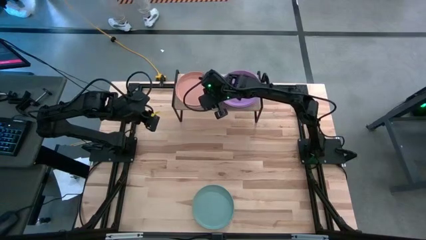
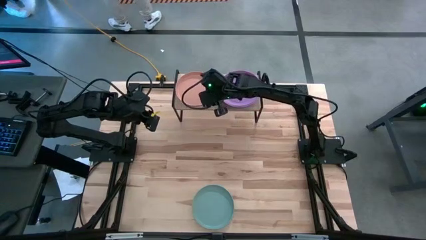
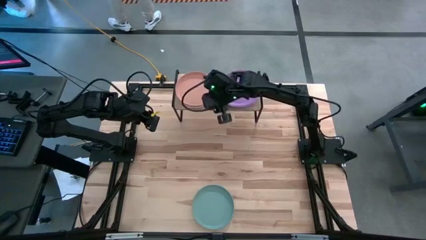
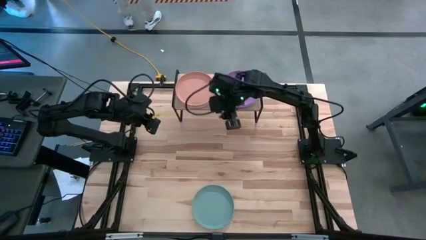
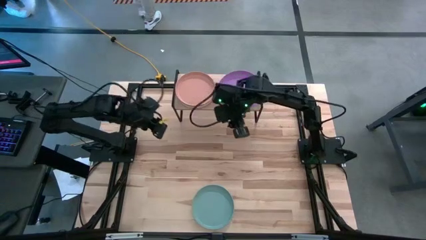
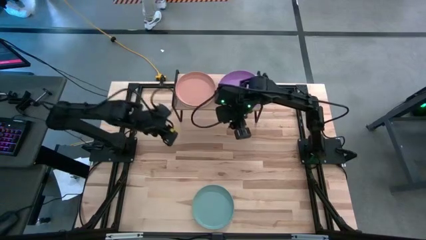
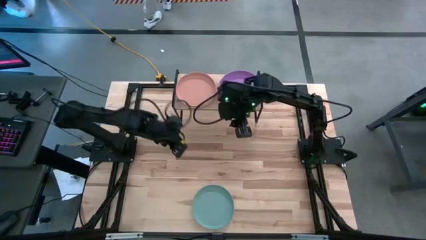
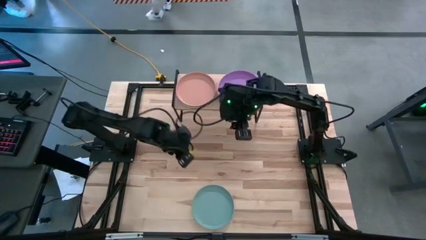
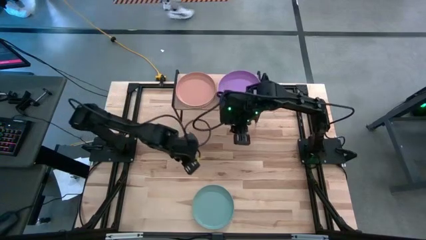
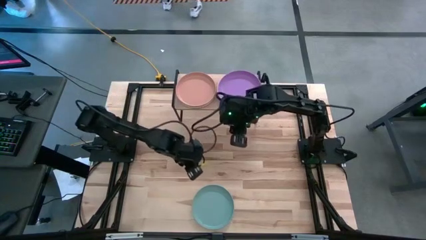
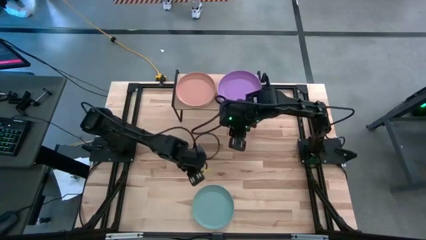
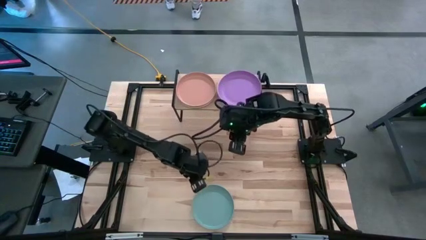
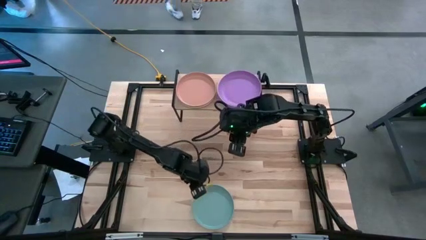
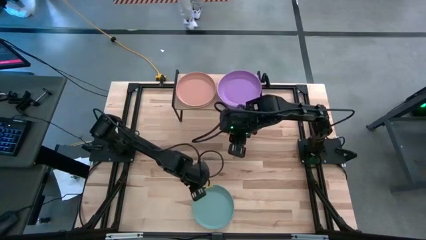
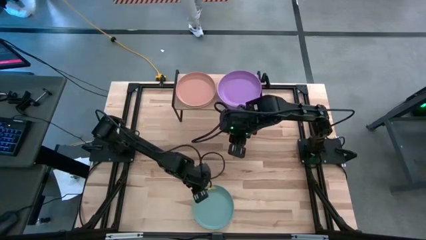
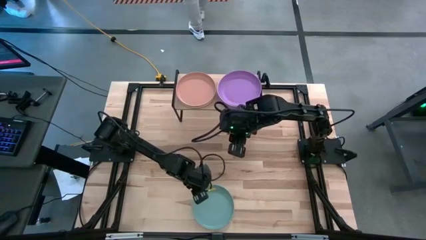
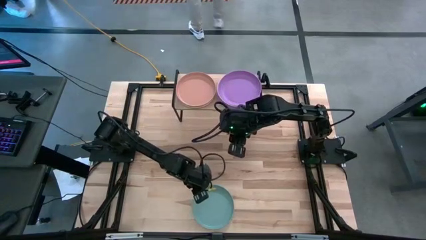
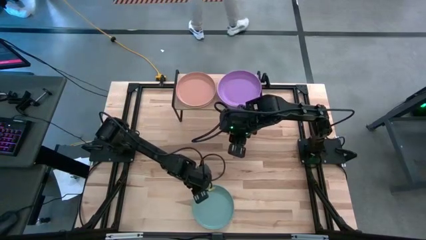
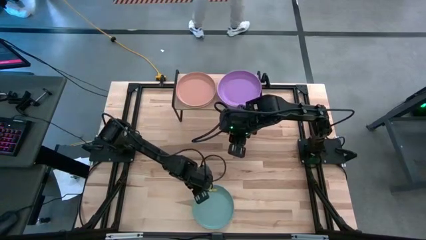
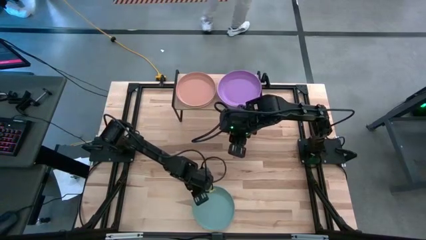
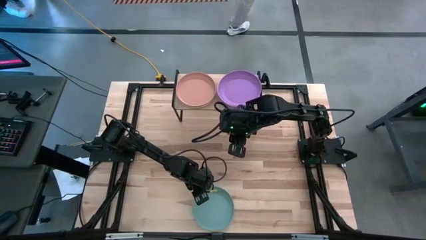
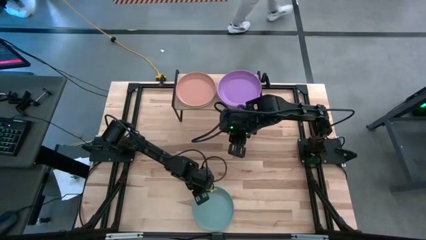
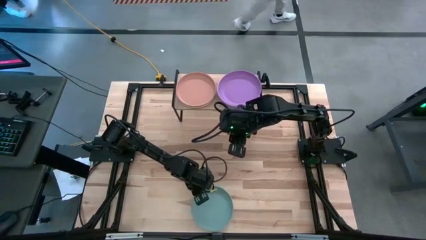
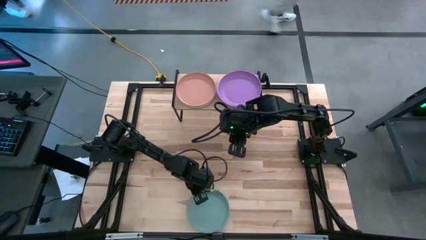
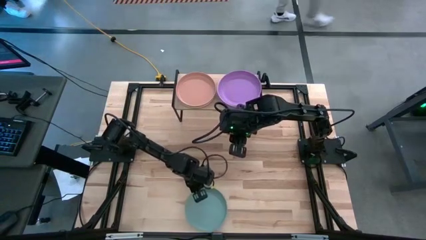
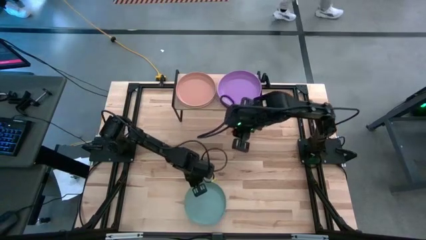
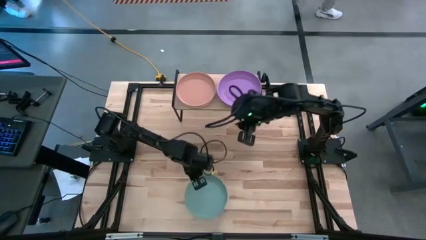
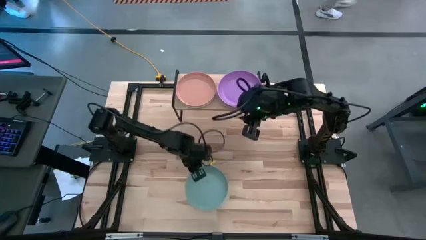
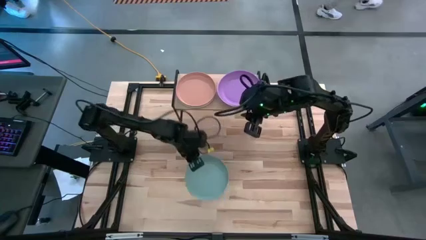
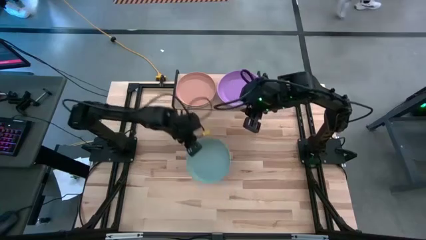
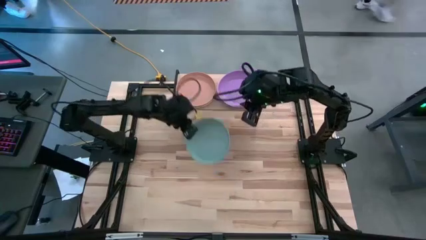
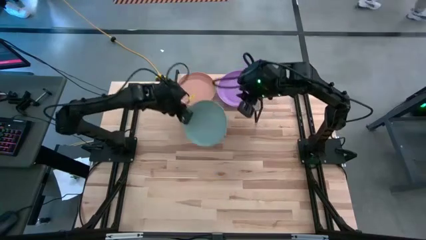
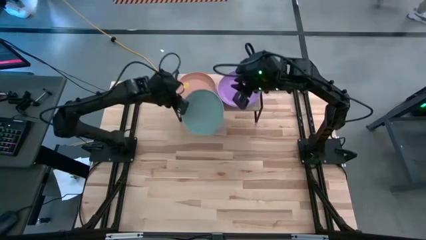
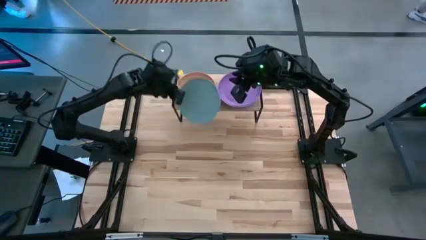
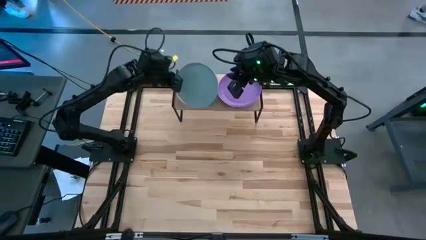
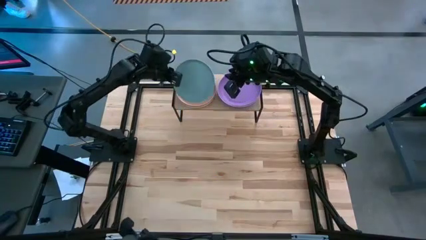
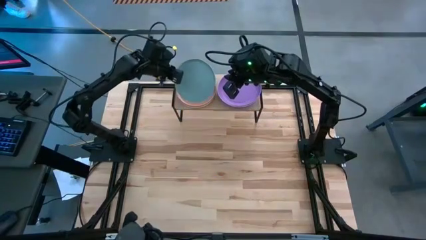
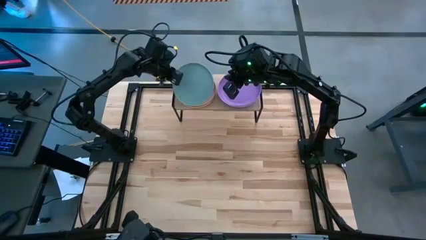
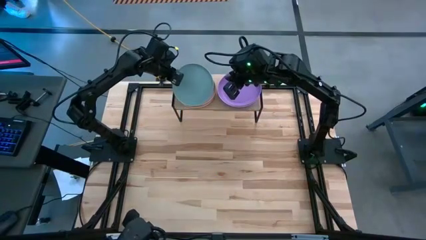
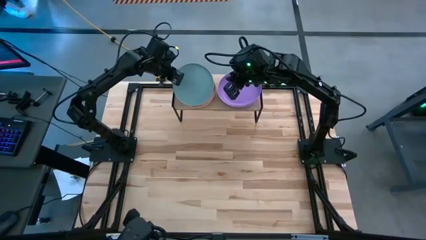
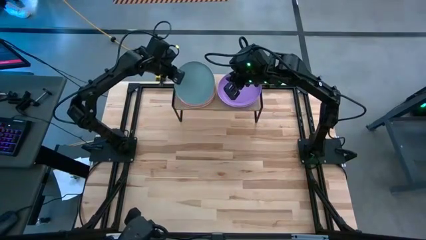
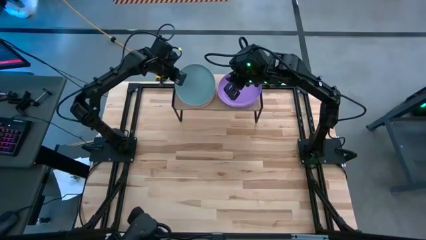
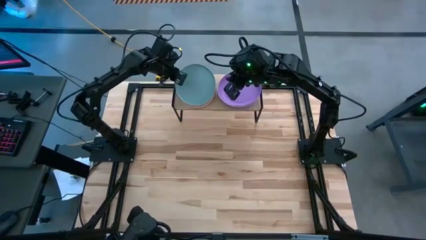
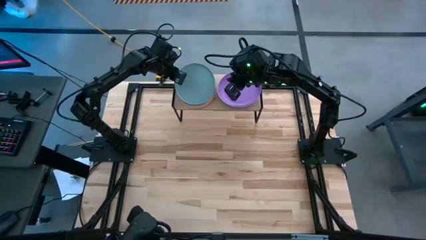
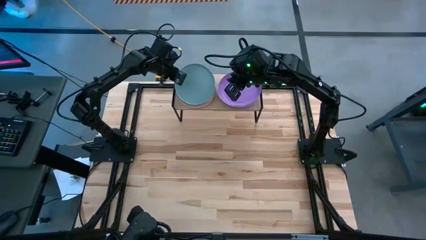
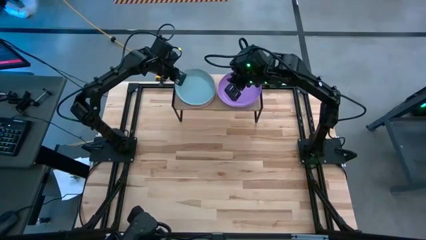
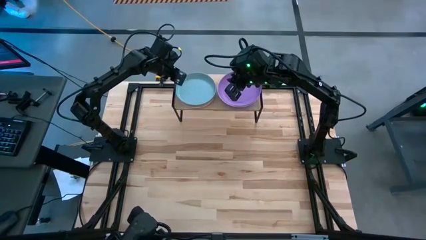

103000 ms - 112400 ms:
Task: Place and stack plates onto a shelf
Stack the green plate on the orange plate on the shelf

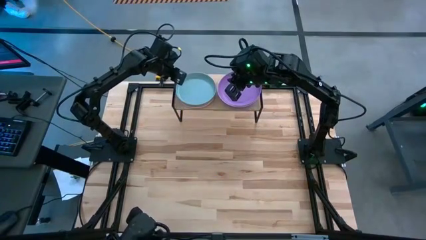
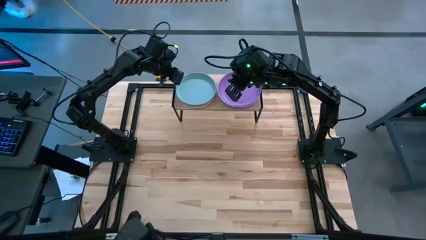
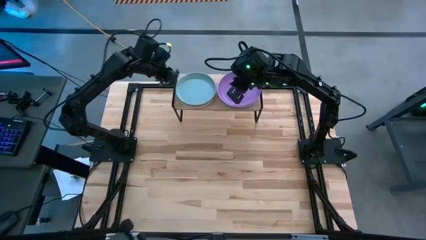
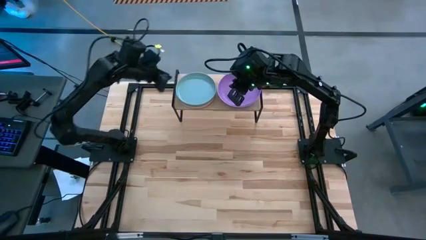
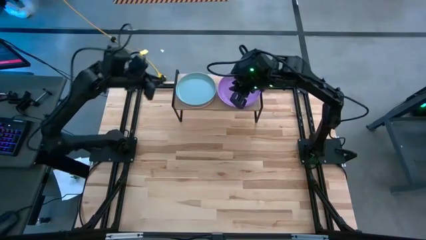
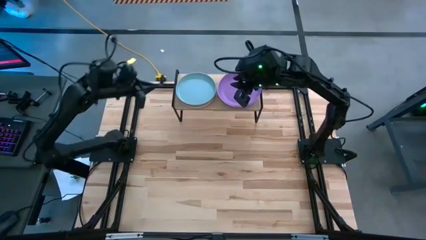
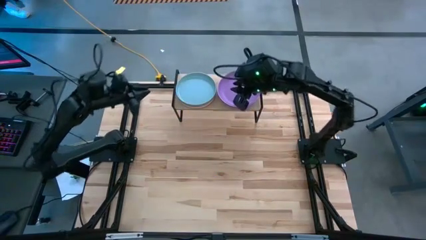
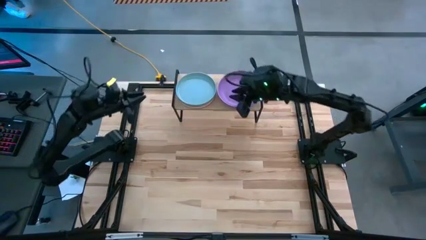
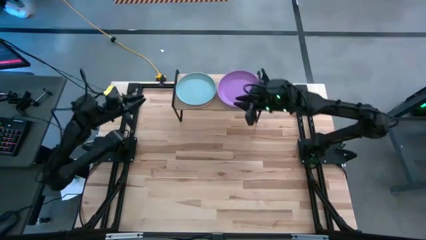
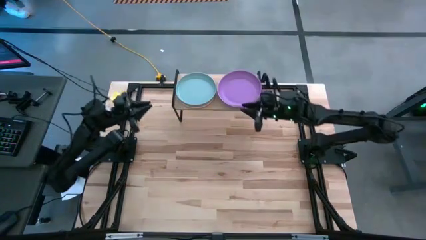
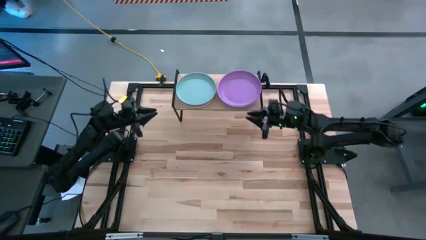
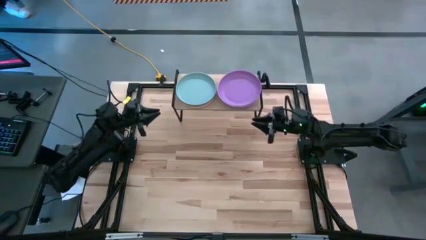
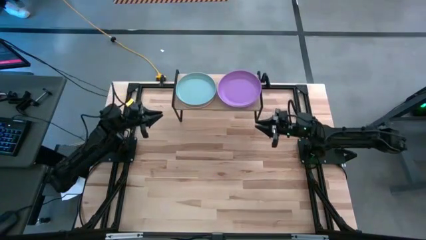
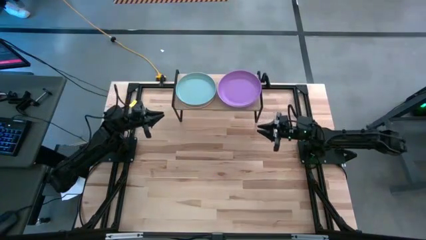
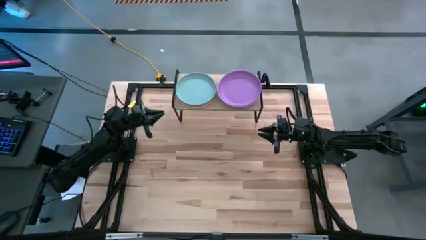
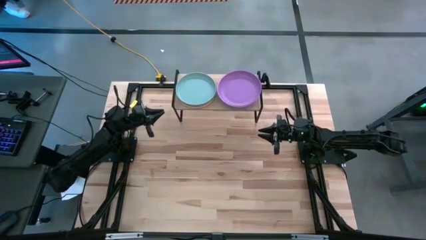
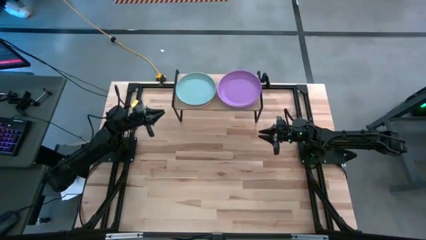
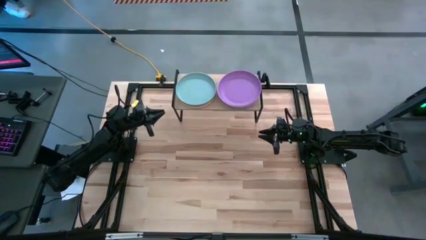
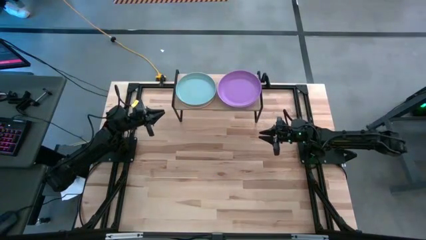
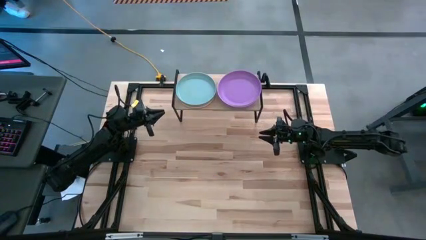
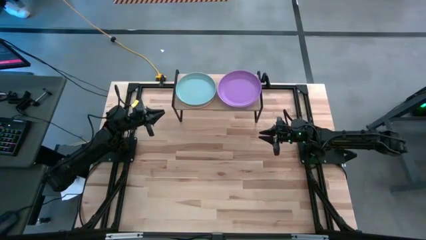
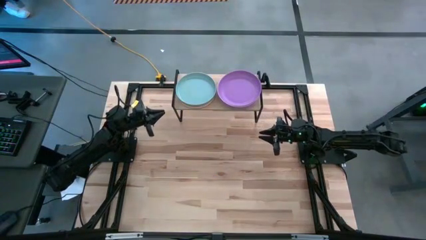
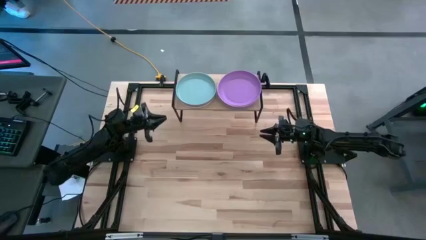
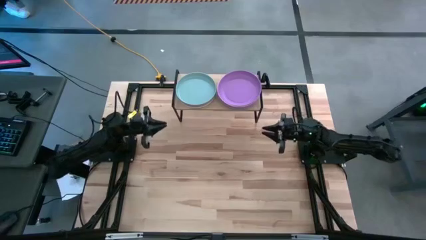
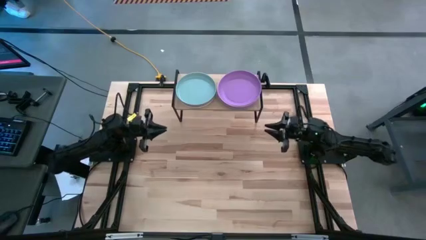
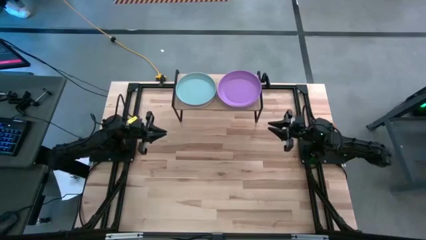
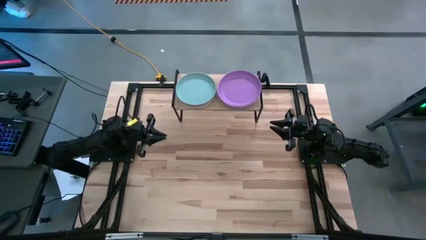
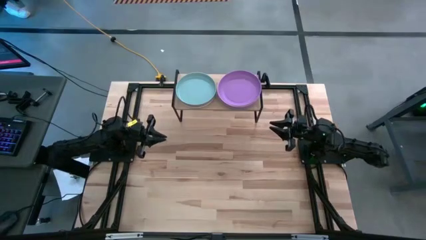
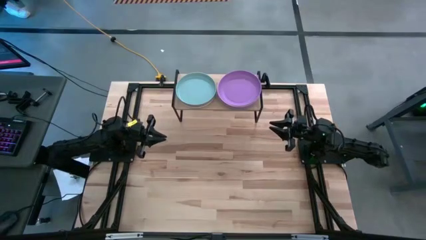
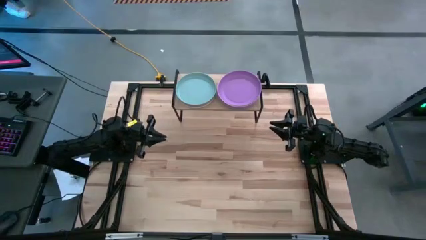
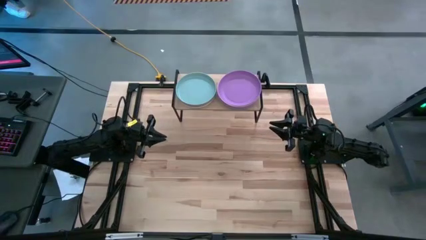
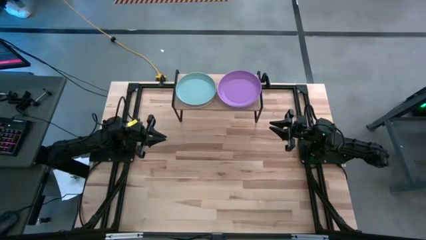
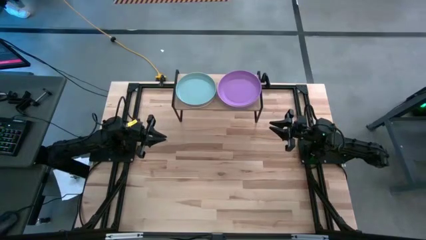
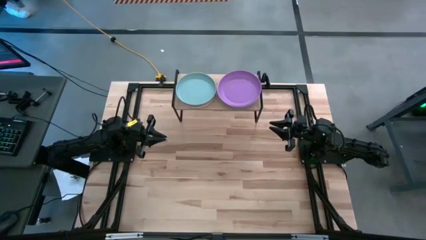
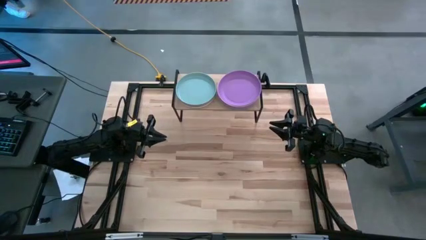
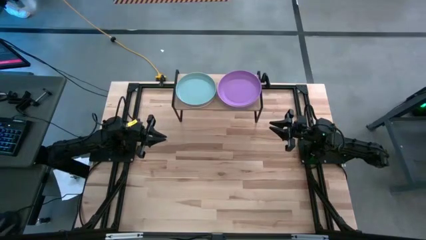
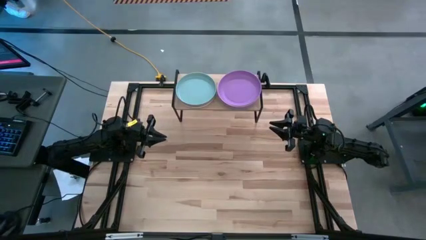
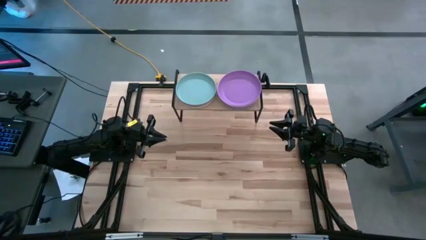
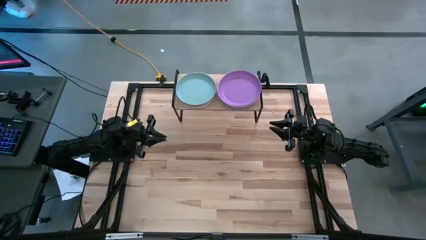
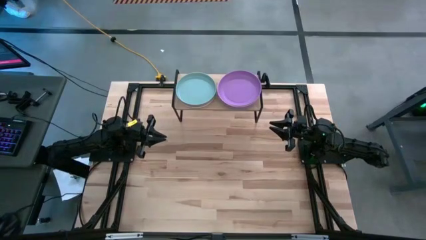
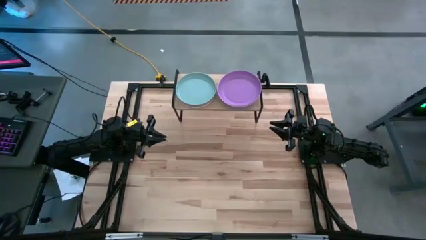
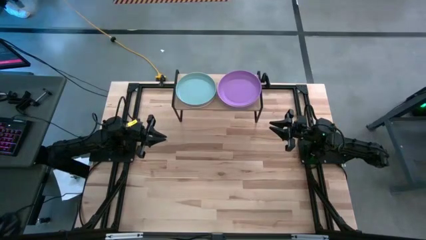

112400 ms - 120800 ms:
Return to Home Position
